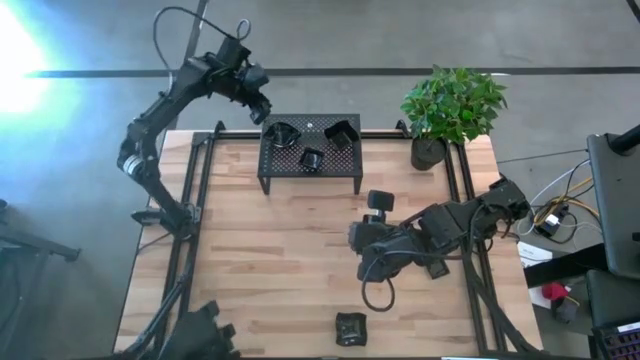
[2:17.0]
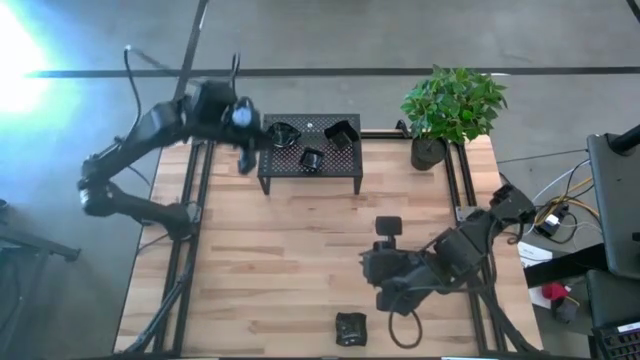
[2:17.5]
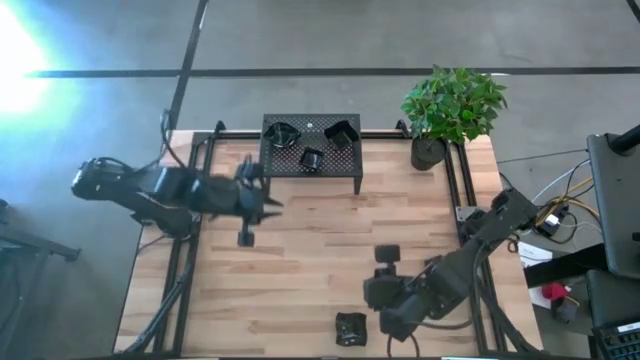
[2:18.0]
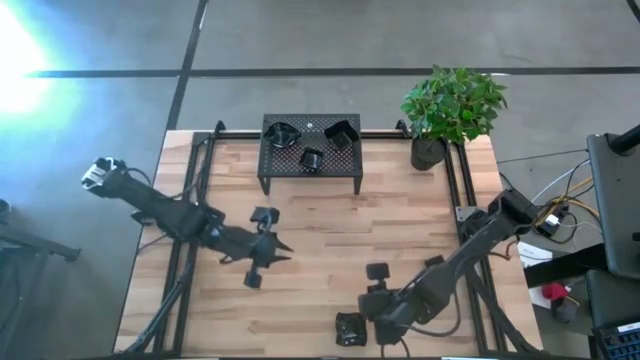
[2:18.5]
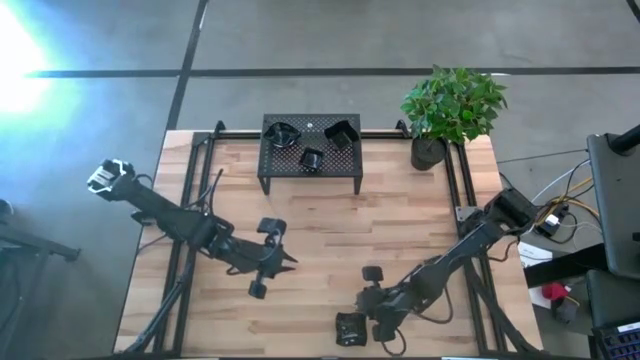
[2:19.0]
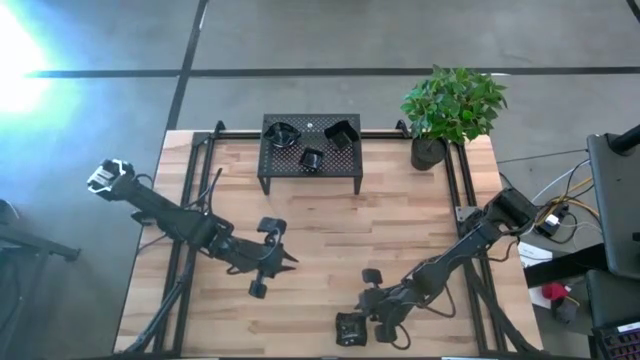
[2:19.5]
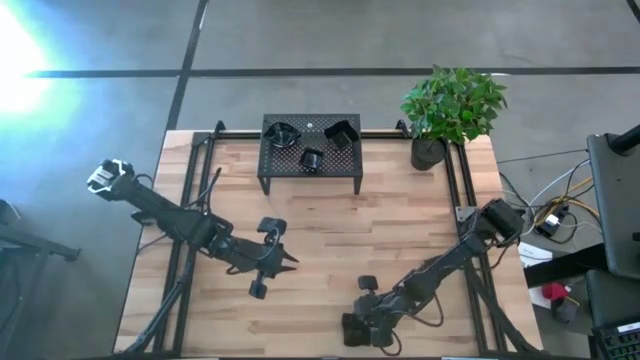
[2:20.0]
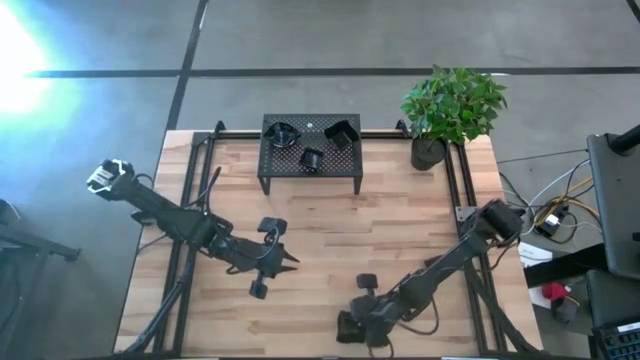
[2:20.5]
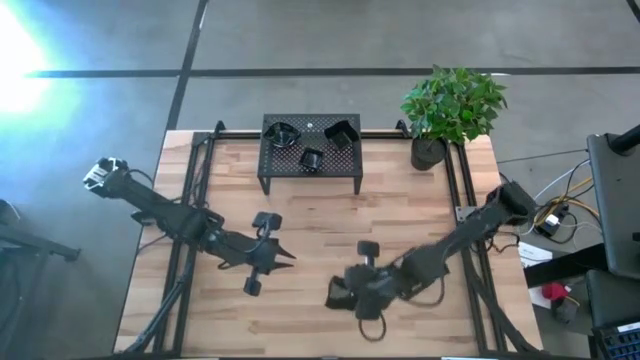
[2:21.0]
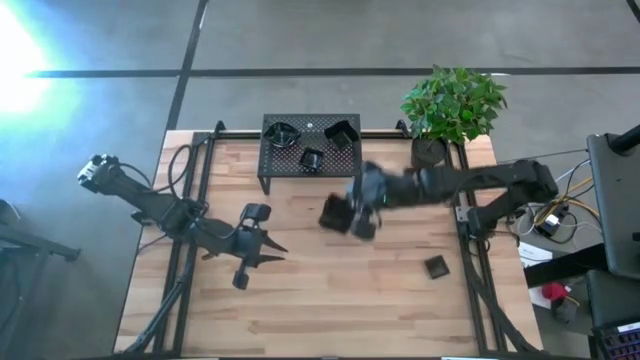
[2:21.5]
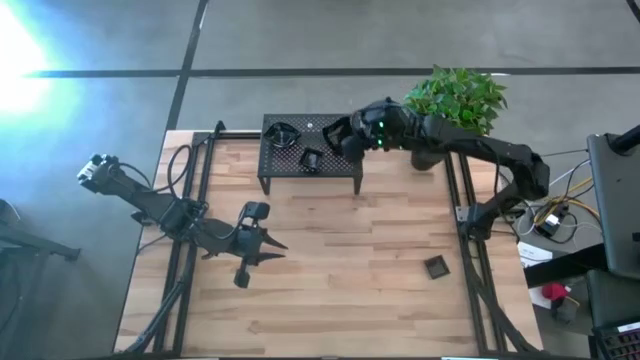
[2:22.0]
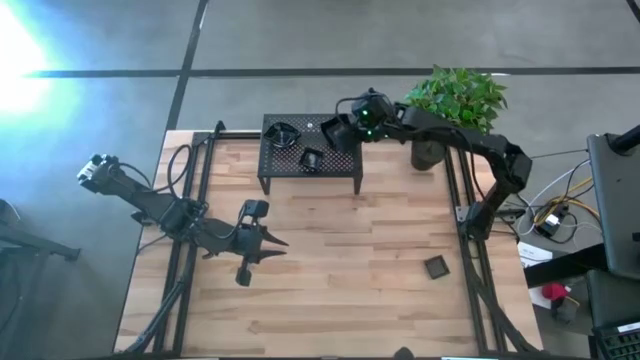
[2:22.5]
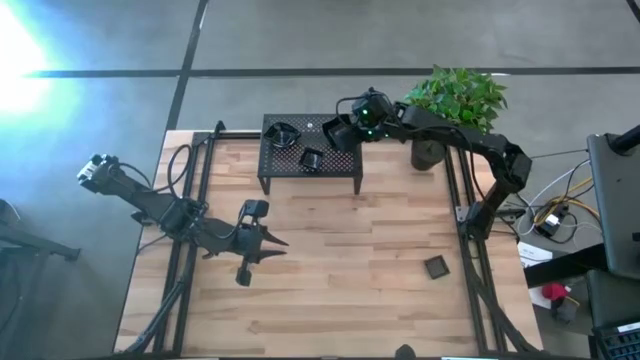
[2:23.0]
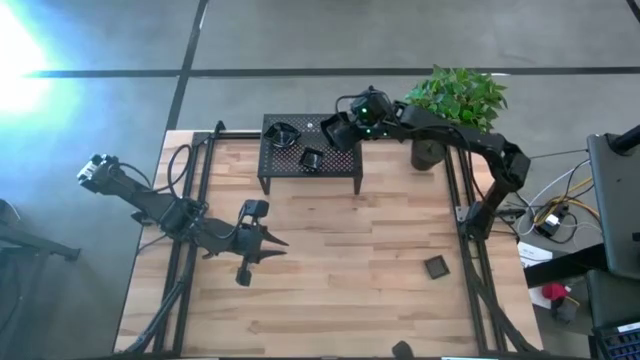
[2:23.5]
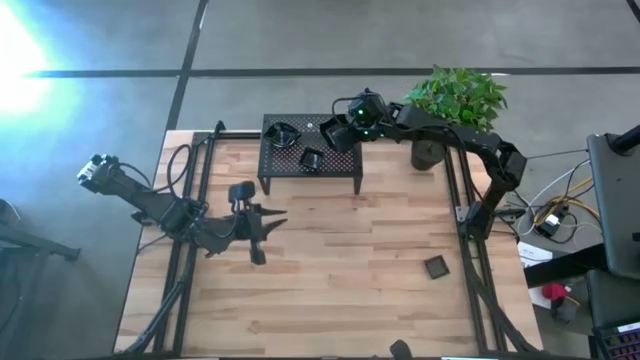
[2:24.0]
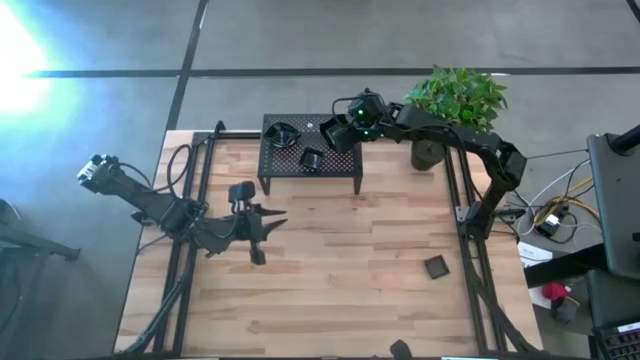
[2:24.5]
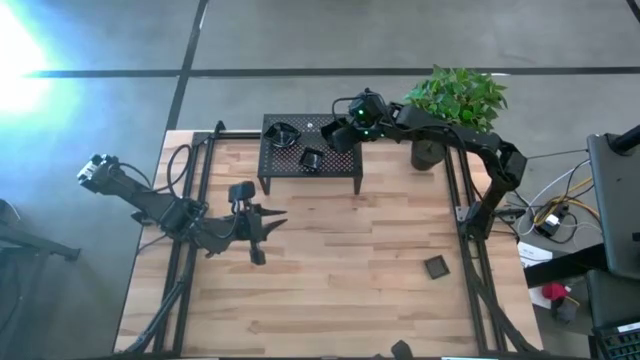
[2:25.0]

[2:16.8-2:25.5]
Task: Pick & Place Mini shaped plates
Stack the distorted square plate on top of the distorted square plates on the shelf

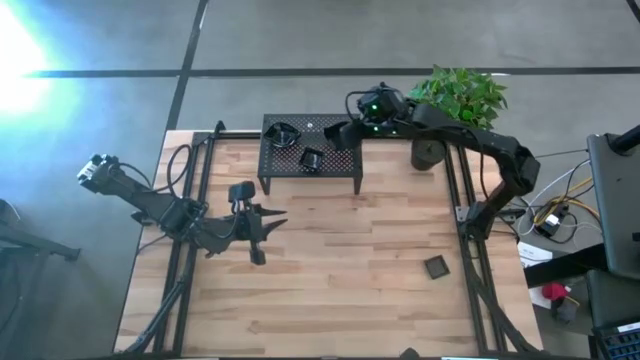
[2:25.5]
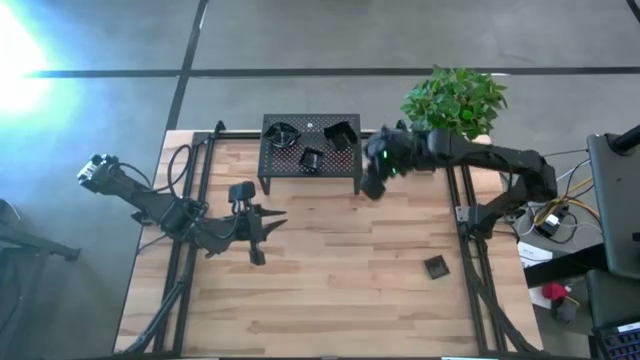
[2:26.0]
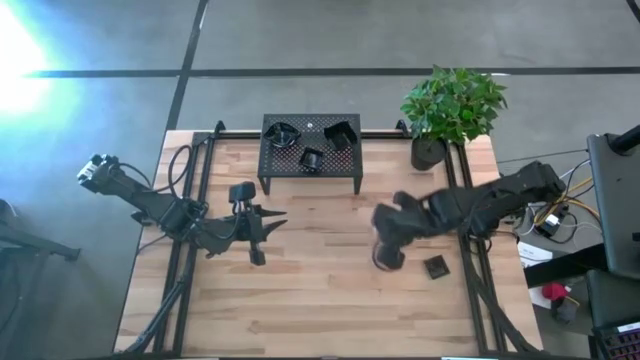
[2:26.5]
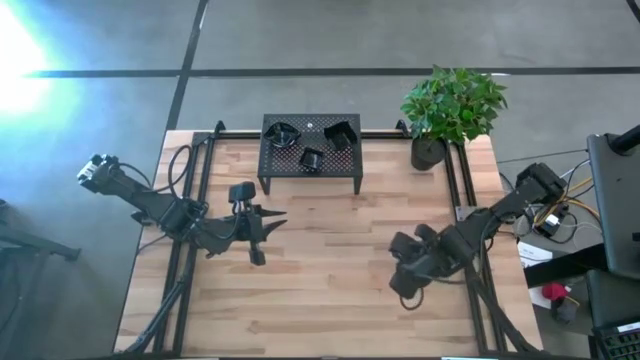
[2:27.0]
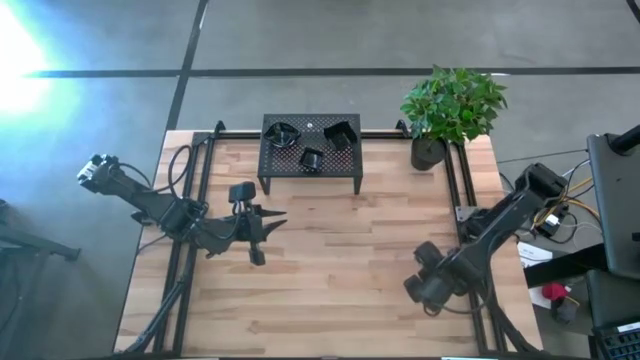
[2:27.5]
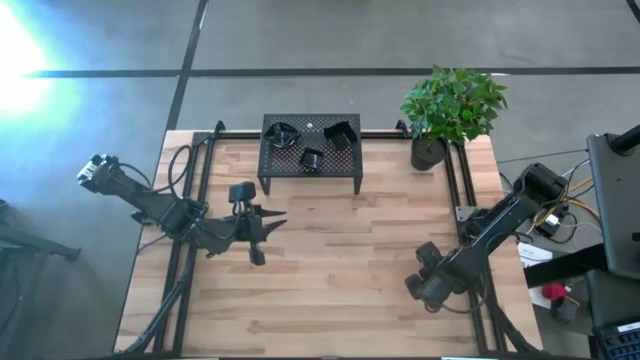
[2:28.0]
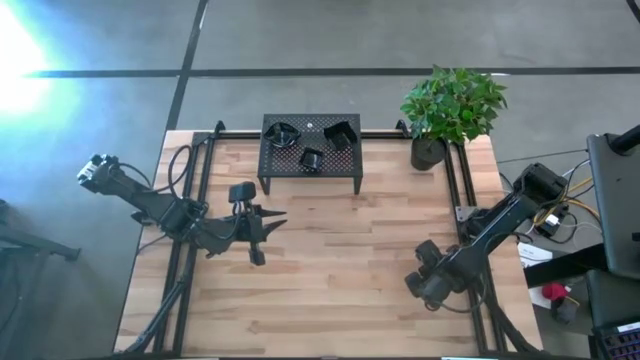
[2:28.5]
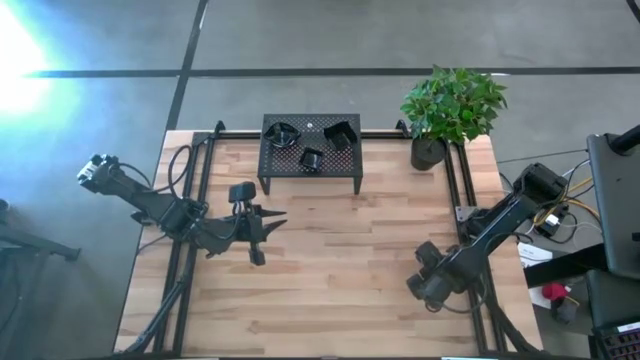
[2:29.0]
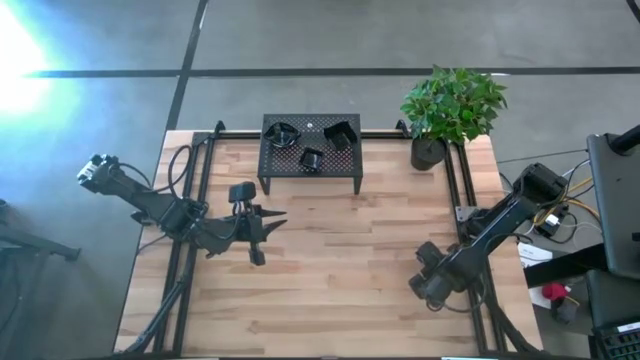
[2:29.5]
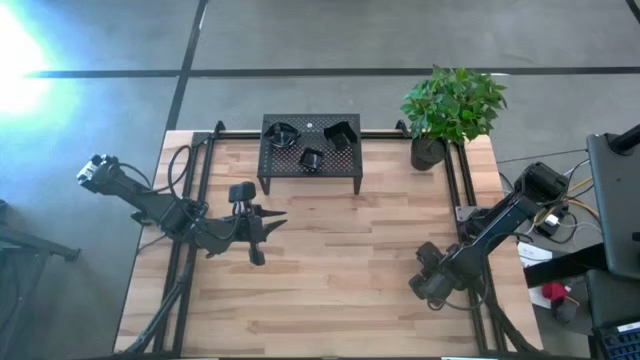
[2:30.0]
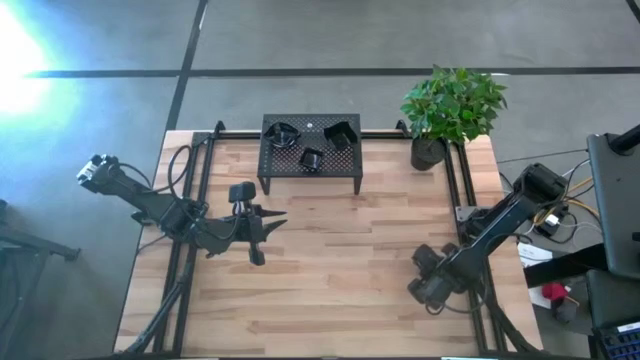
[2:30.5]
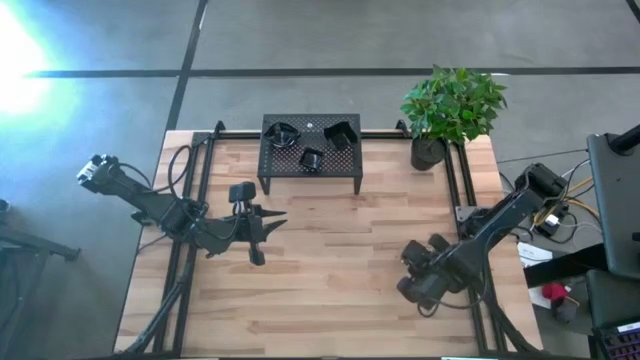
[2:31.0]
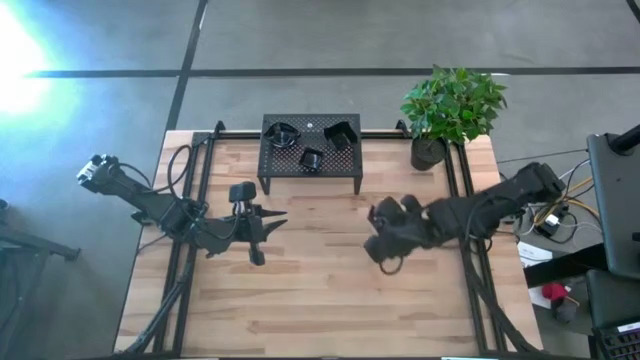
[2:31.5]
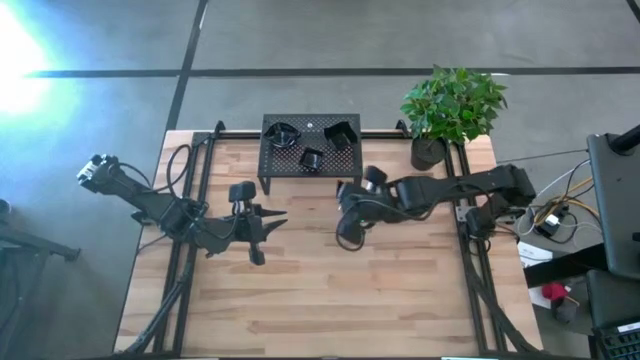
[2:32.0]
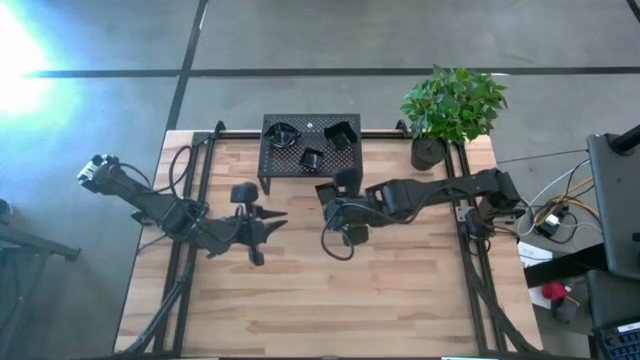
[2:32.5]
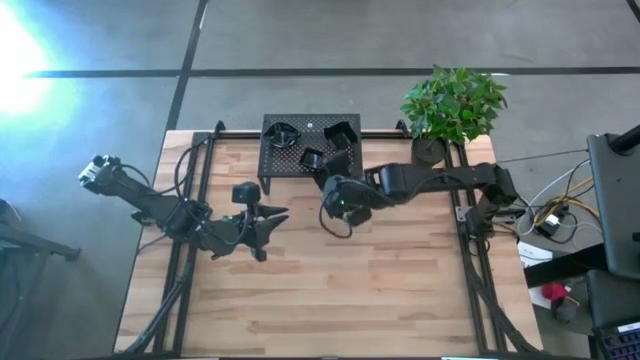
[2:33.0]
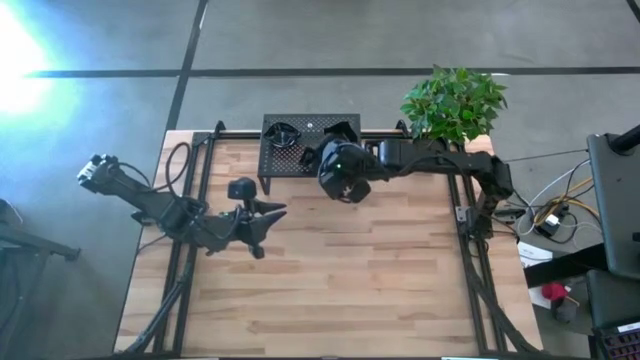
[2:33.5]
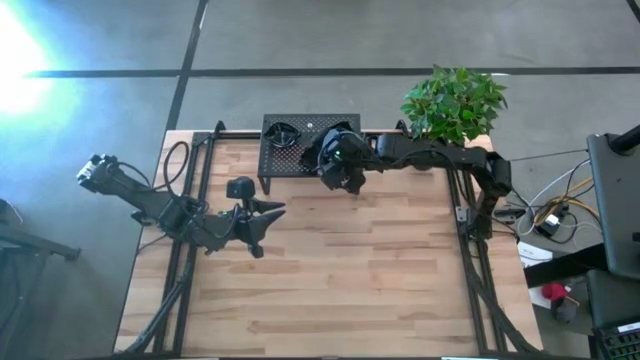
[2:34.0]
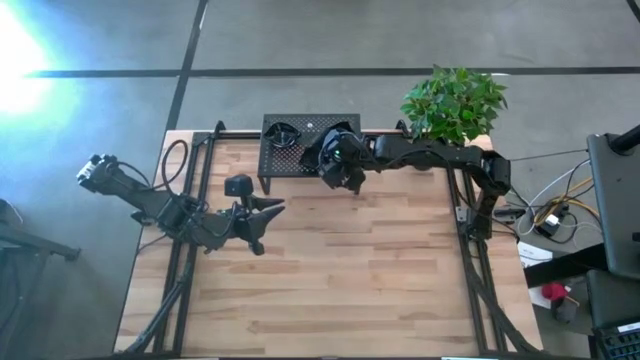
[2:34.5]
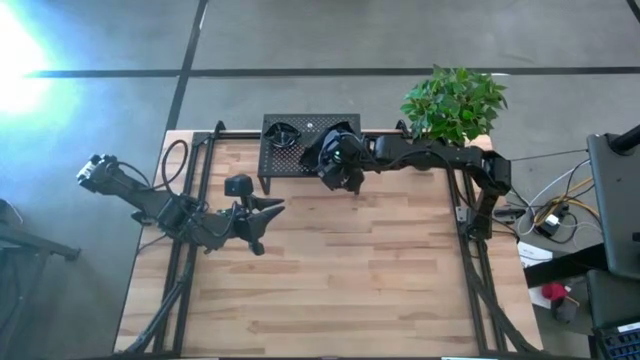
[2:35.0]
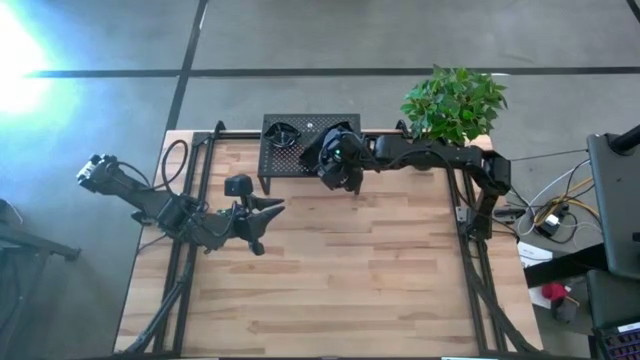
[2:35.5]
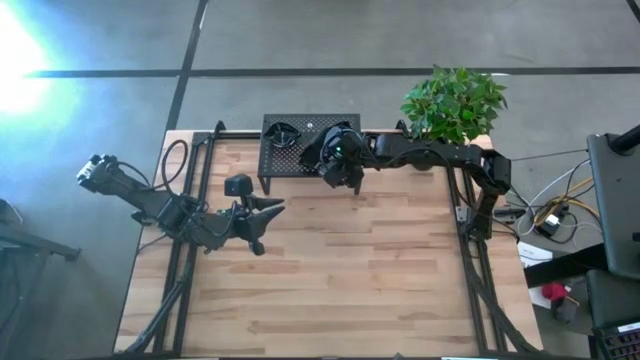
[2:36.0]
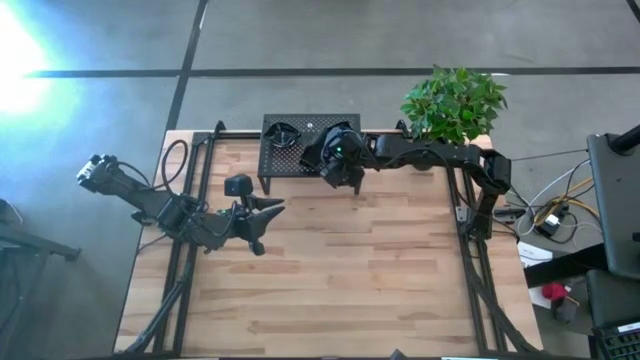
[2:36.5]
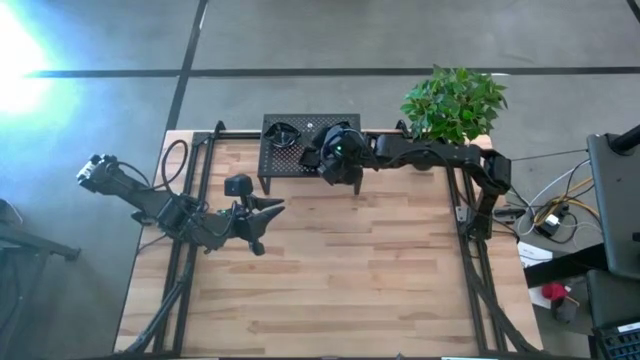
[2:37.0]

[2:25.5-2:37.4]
Stack the square plate on top of the square plates on the shelf

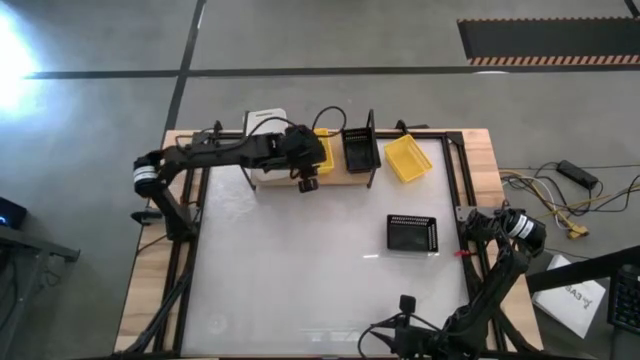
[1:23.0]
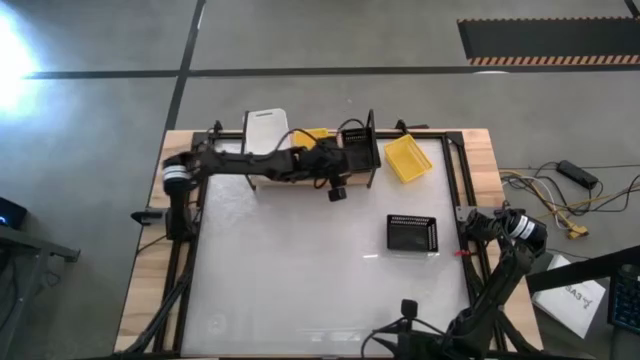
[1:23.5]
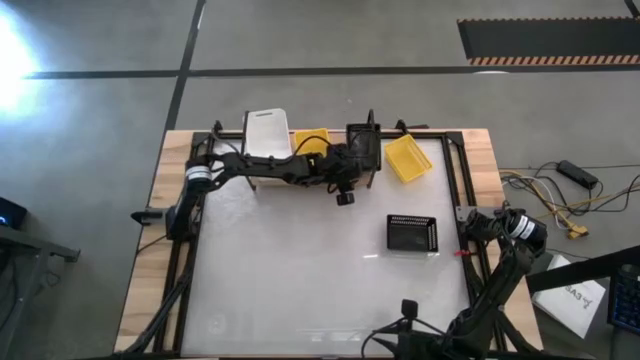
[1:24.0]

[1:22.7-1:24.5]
Task: Stack baskets on shelf by color
Adjust the stacked black bins on the shelf
